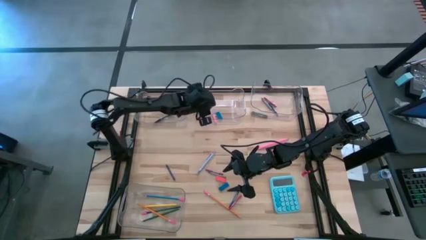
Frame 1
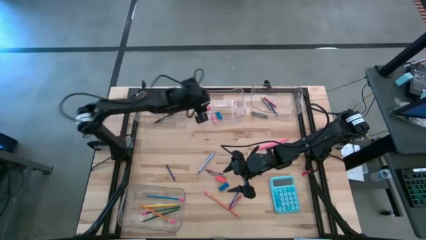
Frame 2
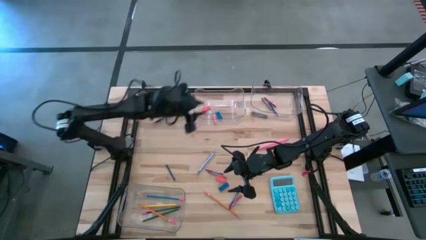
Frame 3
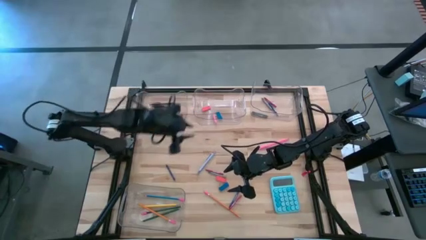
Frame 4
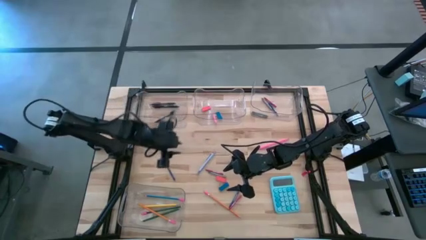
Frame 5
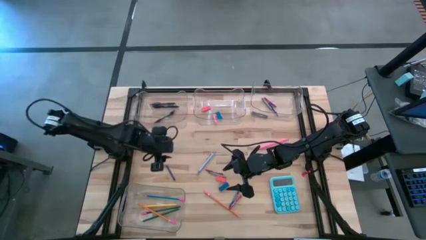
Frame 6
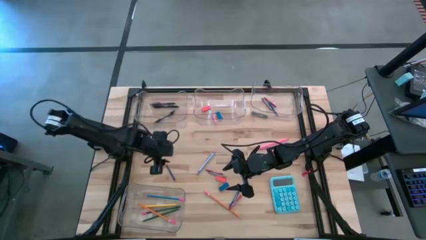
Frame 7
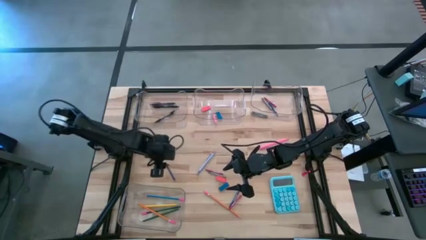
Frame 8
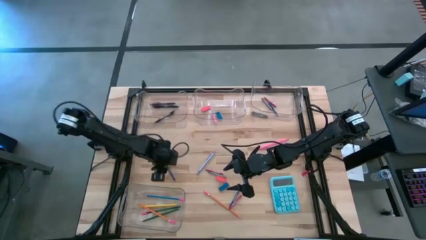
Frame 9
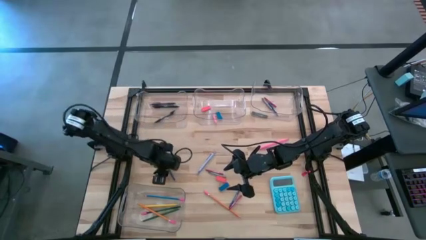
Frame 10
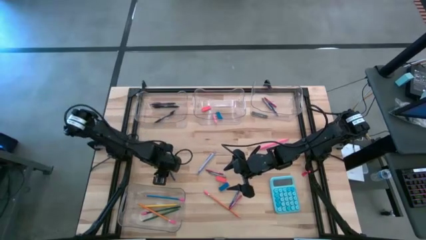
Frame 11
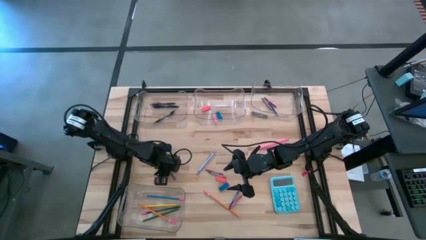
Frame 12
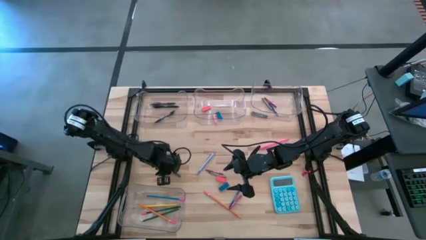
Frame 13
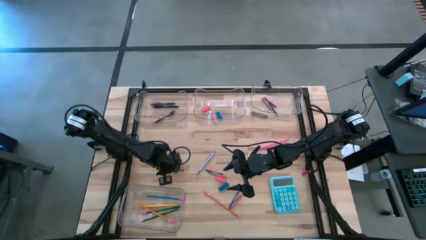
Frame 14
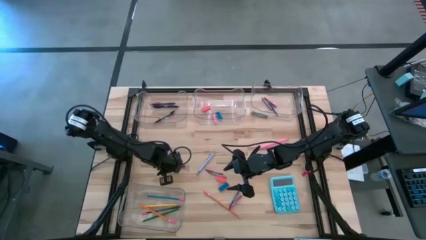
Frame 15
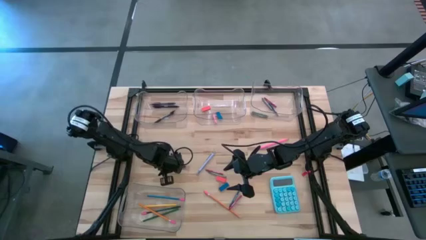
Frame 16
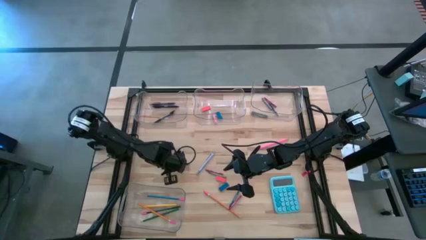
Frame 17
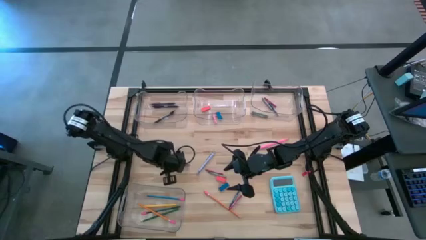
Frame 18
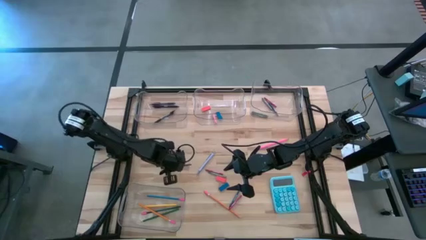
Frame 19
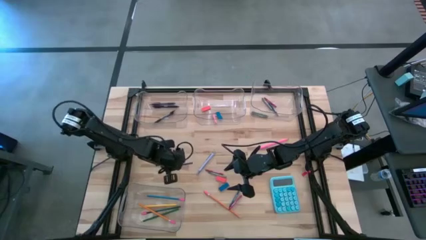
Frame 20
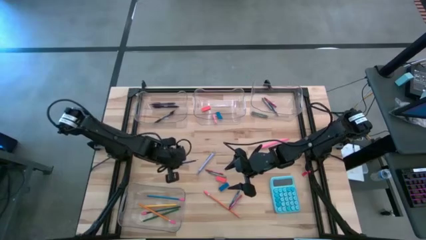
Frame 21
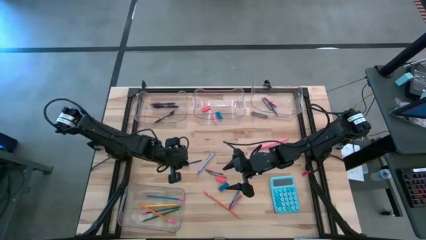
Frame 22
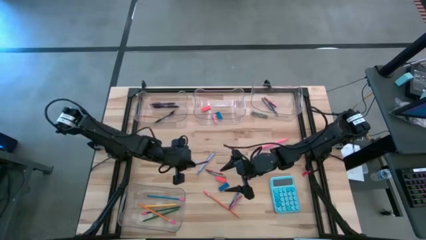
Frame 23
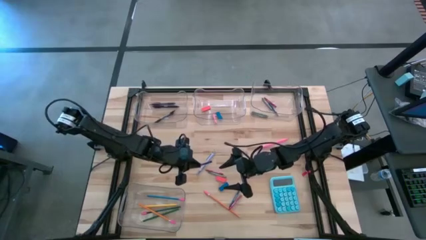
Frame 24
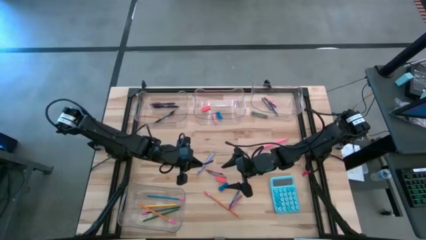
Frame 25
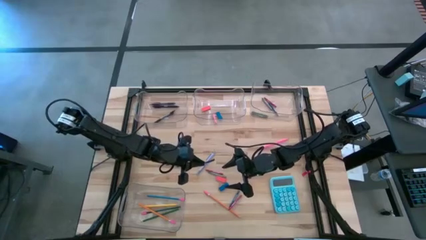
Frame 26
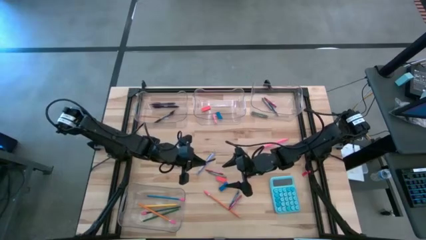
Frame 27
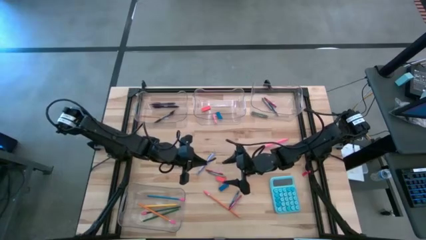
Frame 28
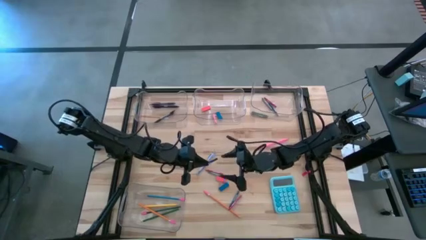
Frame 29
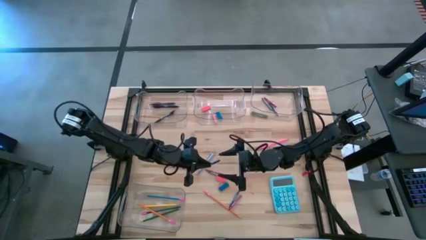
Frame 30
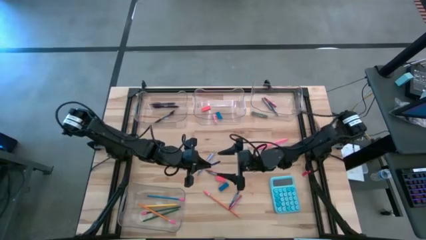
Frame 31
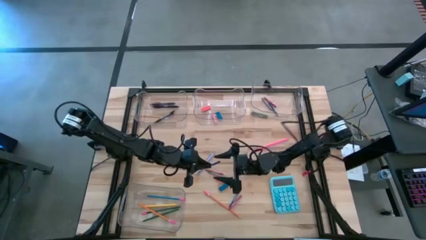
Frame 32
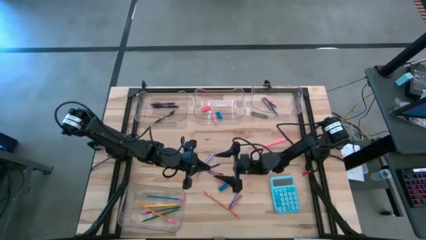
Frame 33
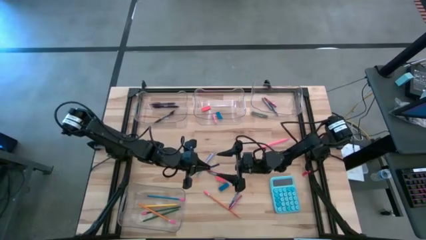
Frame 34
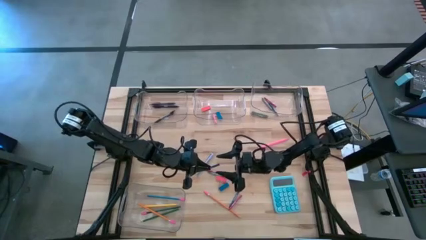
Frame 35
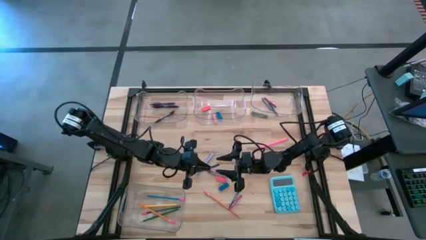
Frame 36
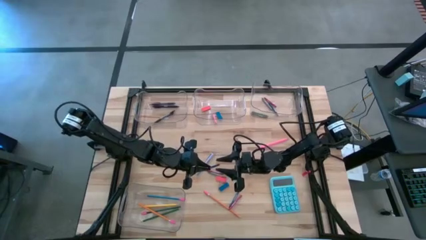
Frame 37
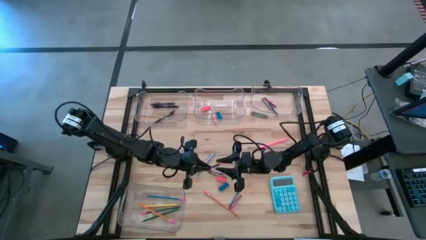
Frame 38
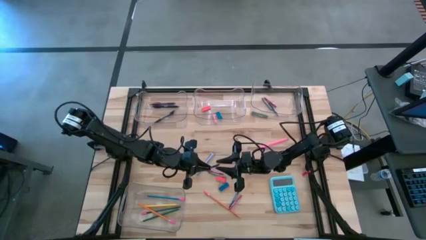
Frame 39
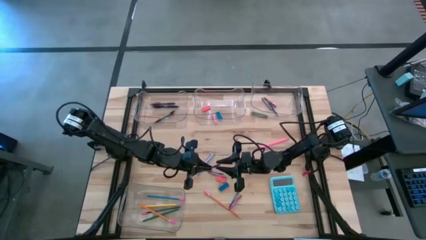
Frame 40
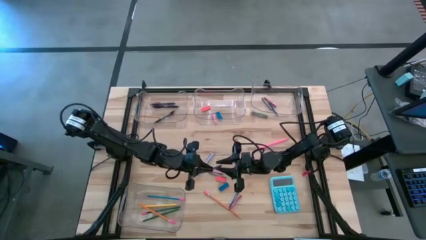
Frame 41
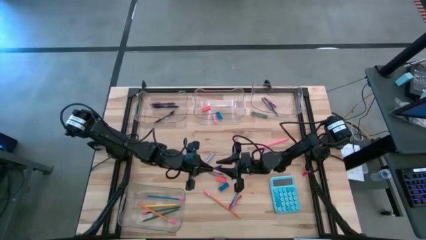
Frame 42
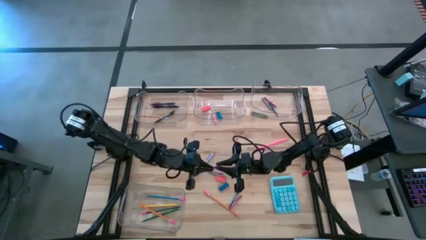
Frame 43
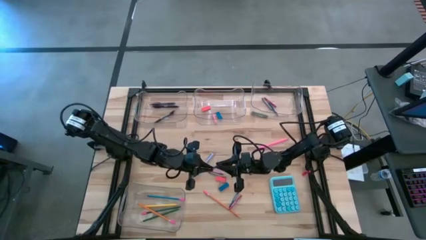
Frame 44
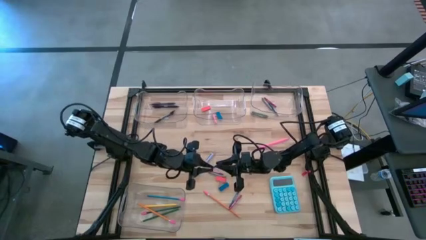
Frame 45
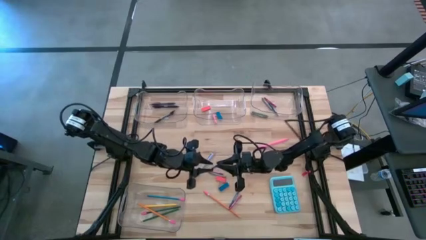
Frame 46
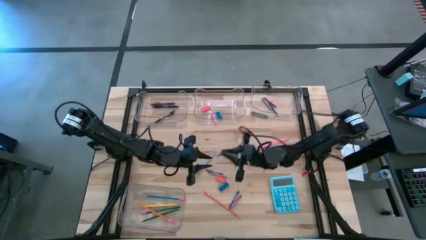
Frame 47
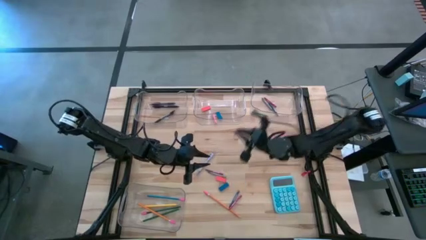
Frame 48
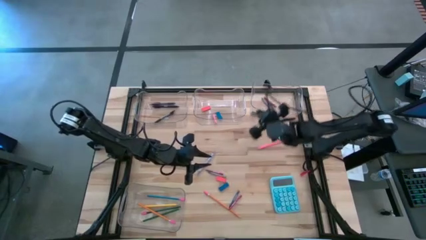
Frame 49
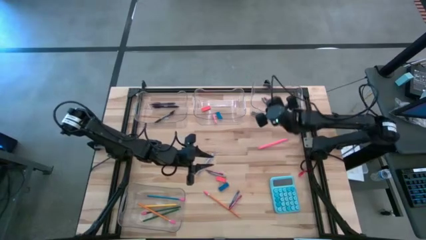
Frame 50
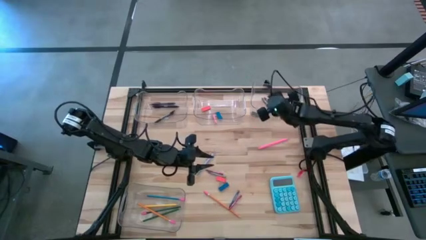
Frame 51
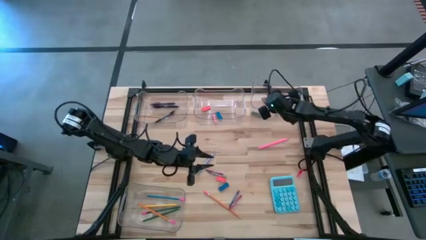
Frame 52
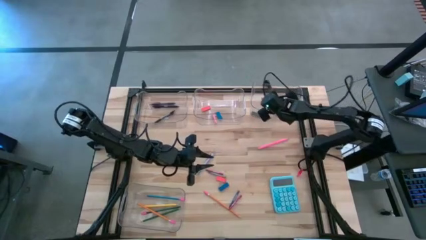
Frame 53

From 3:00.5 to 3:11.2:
Task: Sort crayons/erasers/pens/pencils in bins
Put the blue crayon into the top right transparent bin

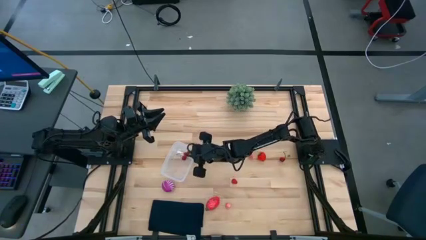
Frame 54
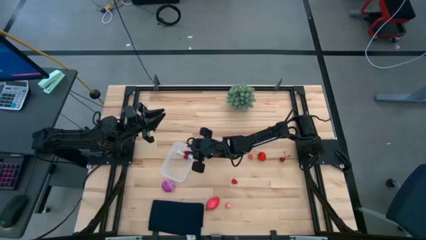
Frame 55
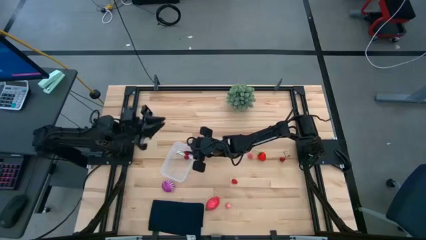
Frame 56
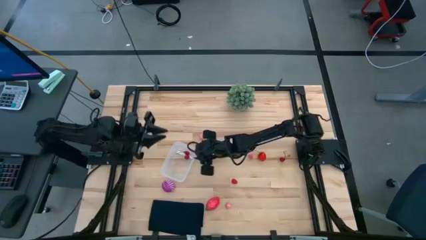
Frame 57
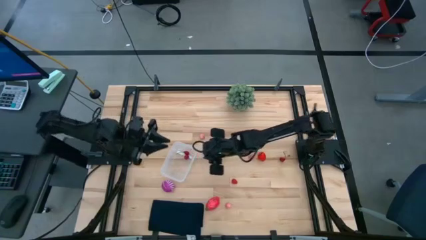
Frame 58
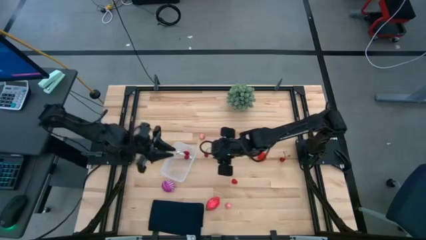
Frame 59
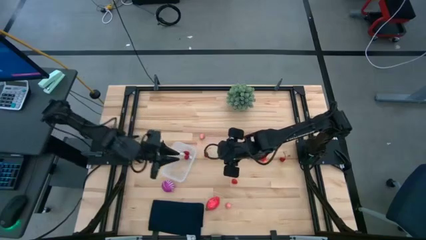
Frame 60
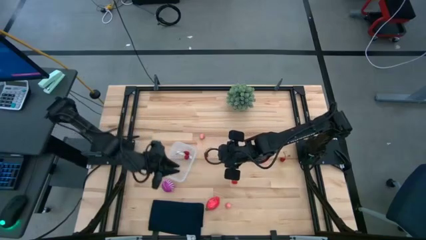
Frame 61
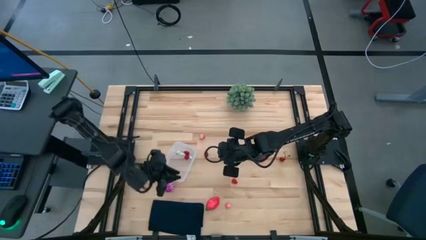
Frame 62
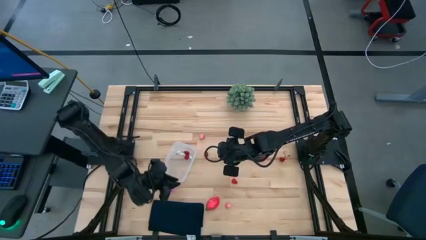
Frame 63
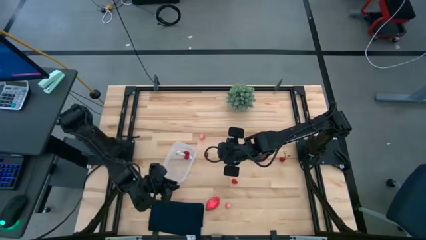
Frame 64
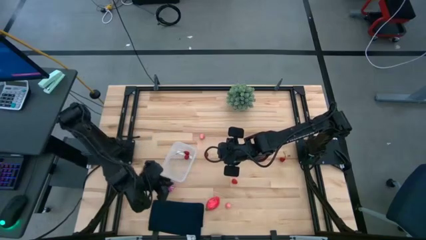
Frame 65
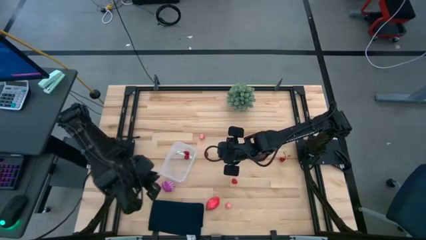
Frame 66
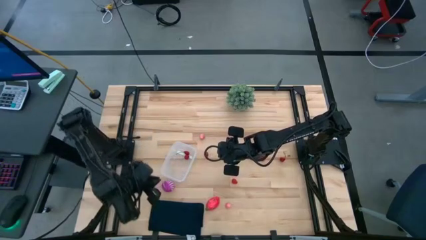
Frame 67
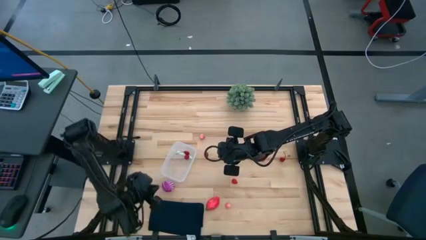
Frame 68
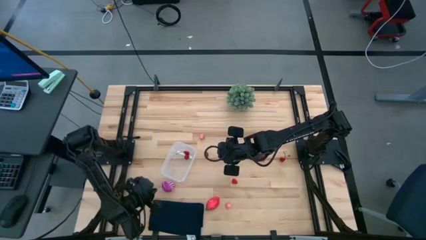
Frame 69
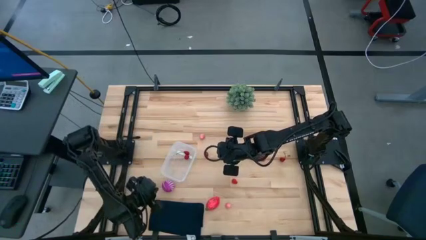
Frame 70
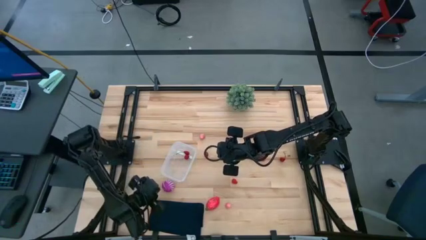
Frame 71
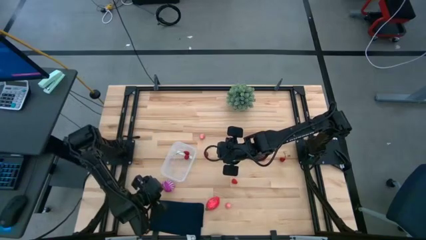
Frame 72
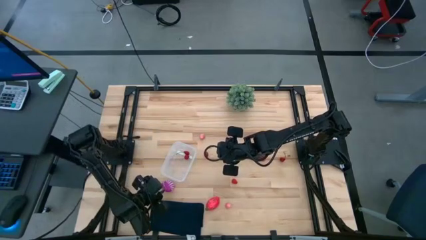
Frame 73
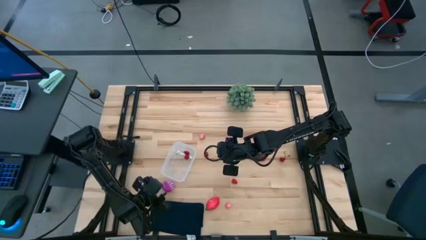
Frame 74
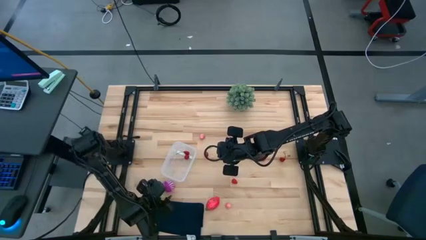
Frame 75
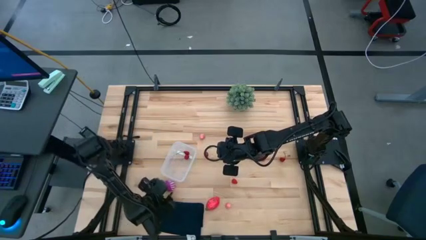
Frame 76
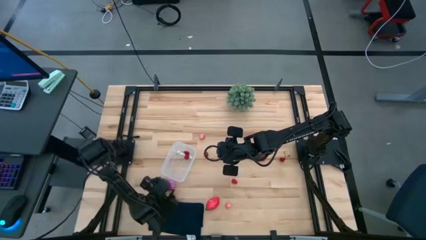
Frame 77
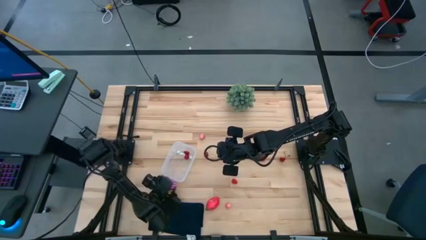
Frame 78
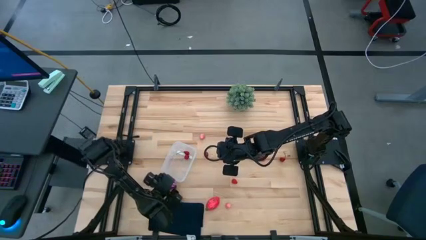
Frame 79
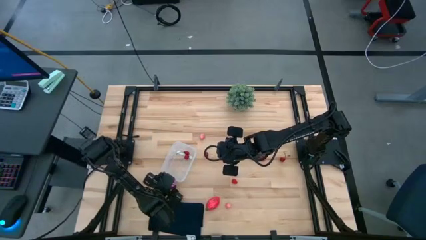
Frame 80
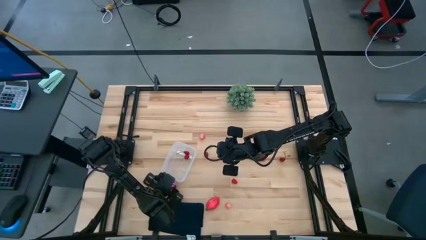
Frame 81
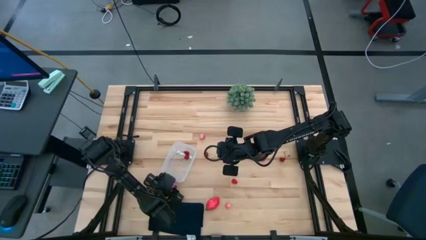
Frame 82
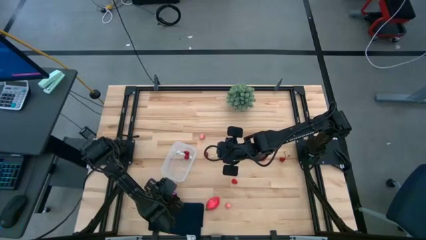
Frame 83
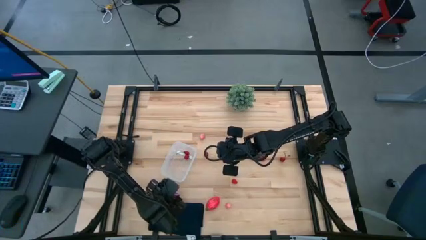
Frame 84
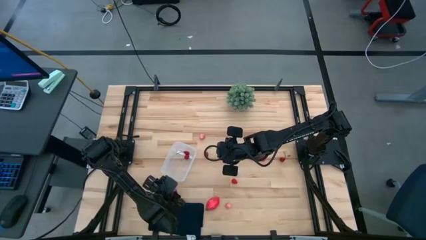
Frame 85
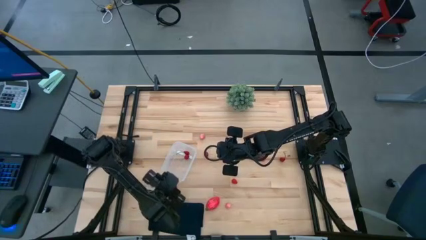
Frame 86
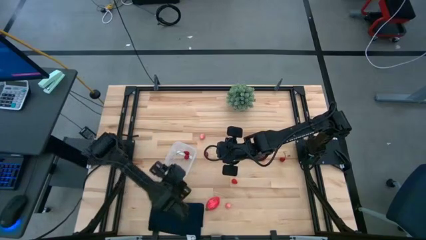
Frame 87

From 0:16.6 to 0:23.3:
Task: Pick and placing Produce into tupperware
Put the purple onion into the transparent bin
